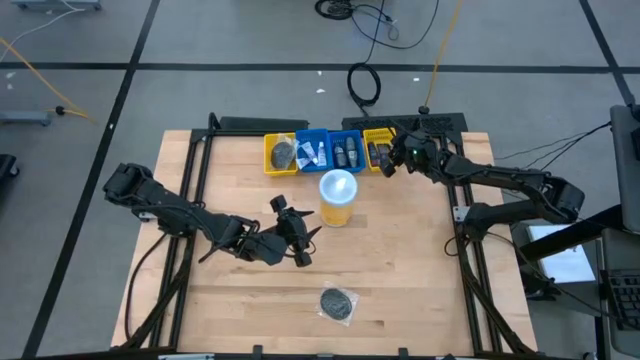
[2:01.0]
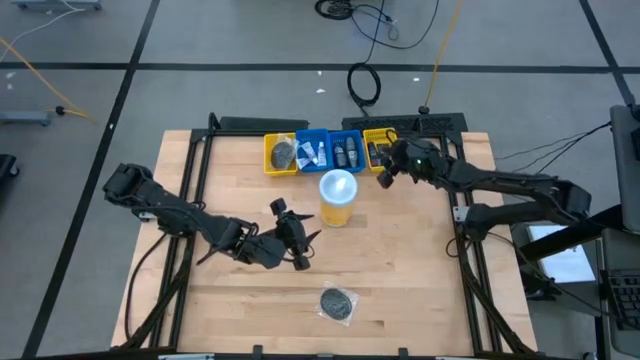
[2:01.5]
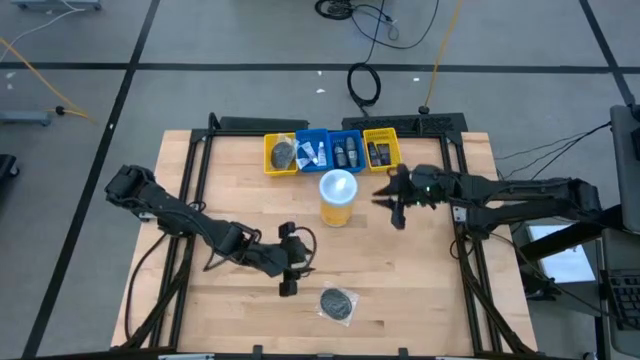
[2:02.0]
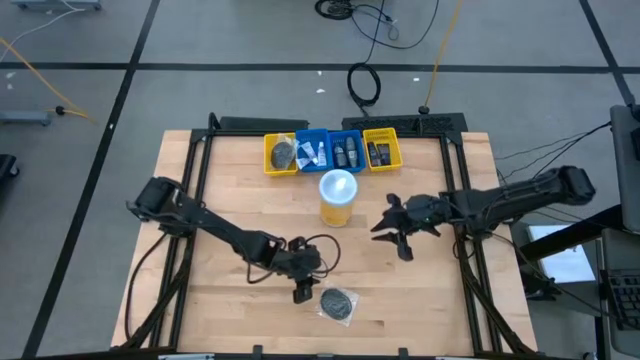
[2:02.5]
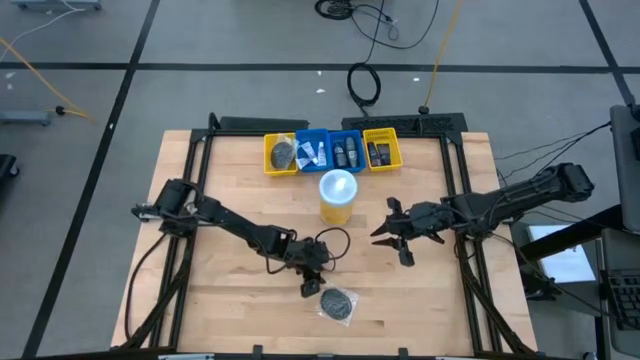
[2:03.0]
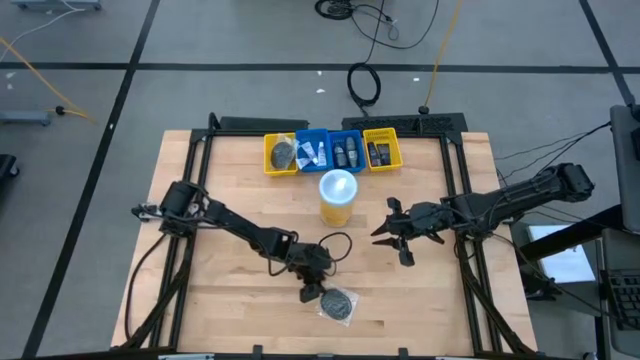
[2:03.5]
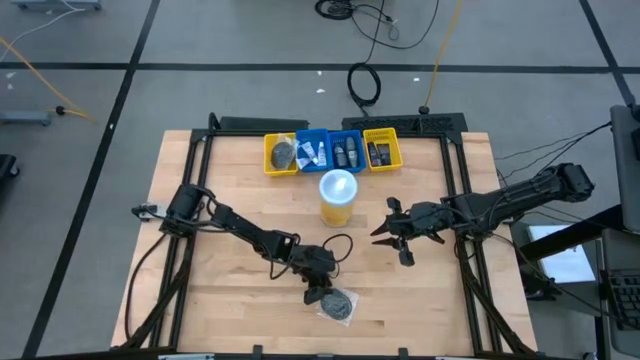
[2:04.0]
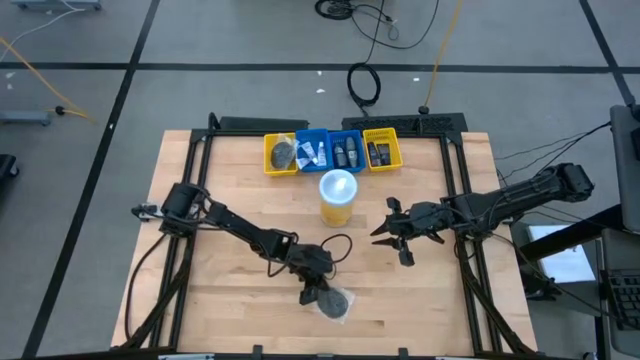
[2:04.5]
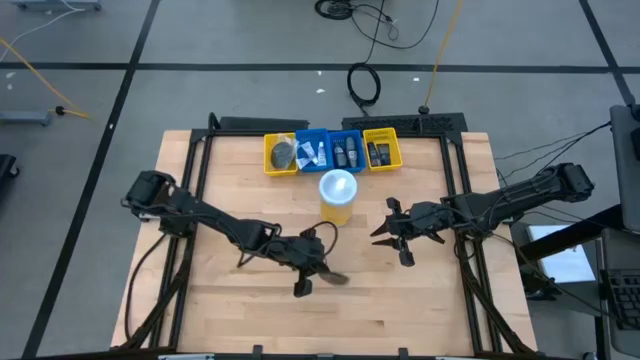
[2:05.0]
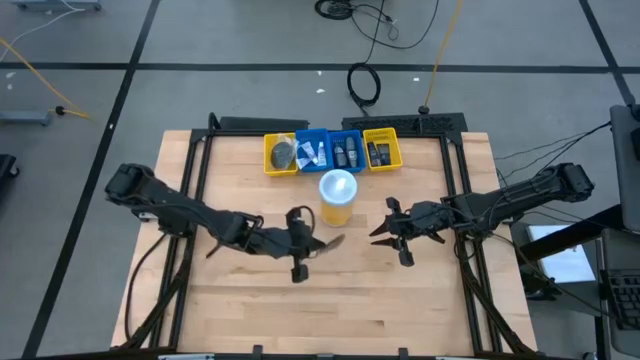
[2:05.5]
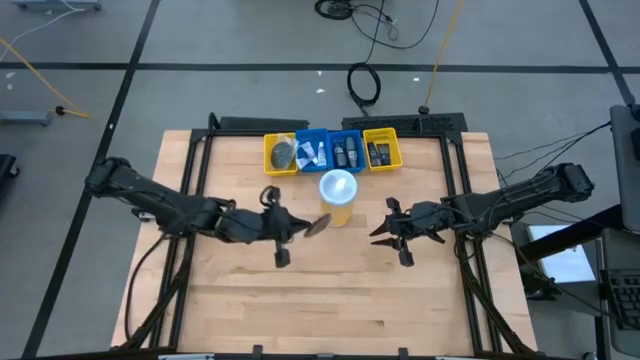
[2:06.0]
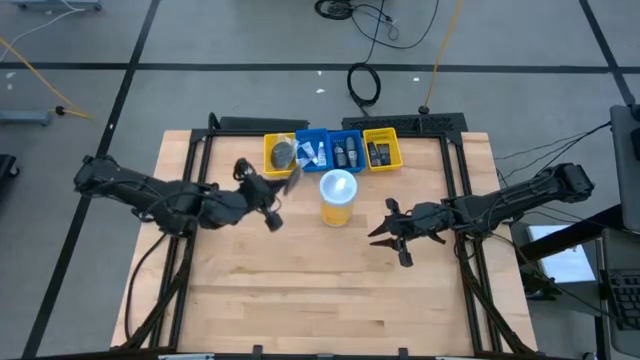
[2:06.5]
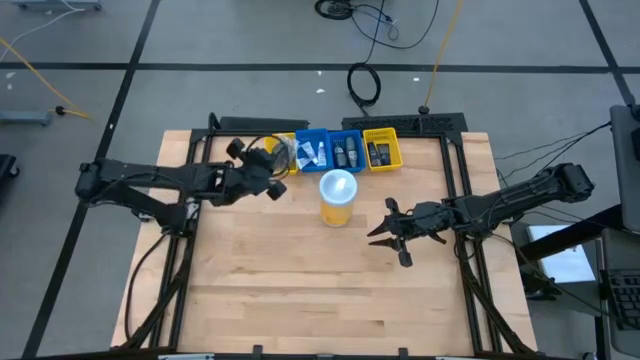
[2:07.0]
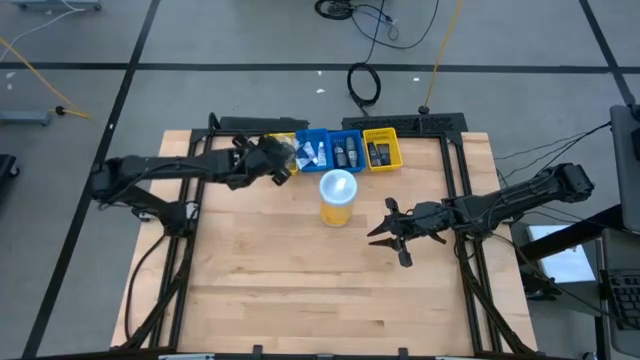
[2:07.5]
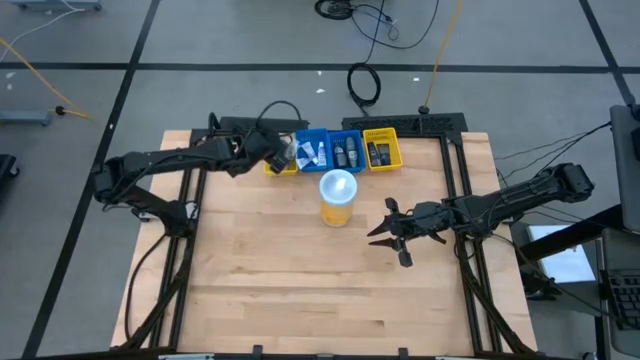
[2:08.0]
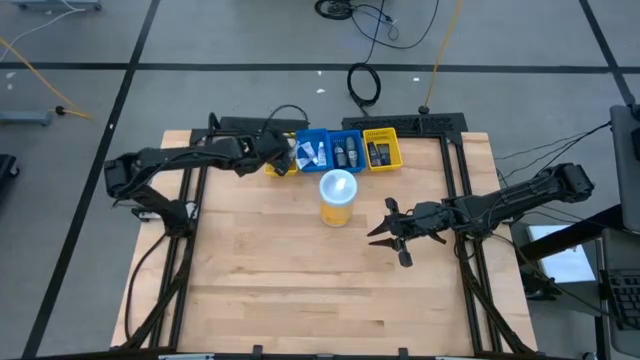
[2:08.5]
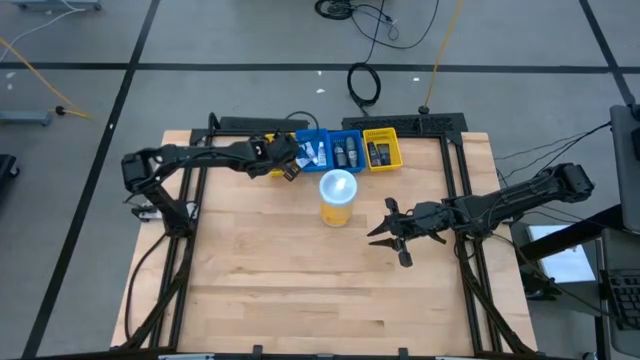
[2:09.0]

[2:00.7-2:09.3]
Task: Pick & Place Travel size toiletries
Put the hairbrush into the left yellow basket

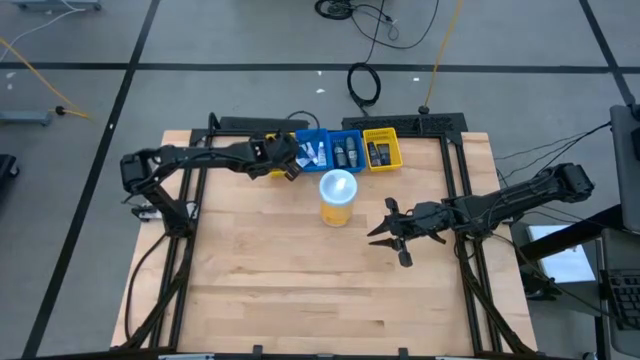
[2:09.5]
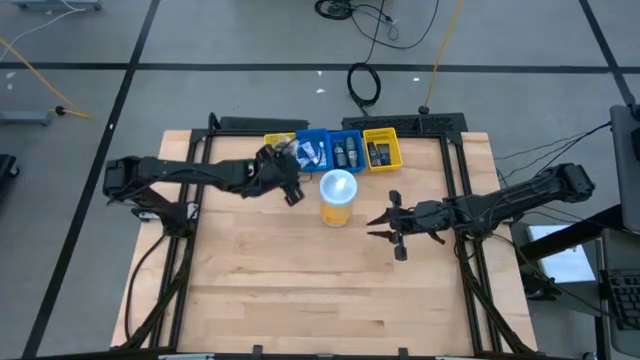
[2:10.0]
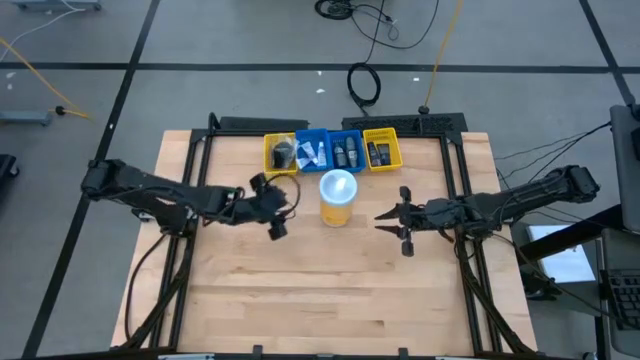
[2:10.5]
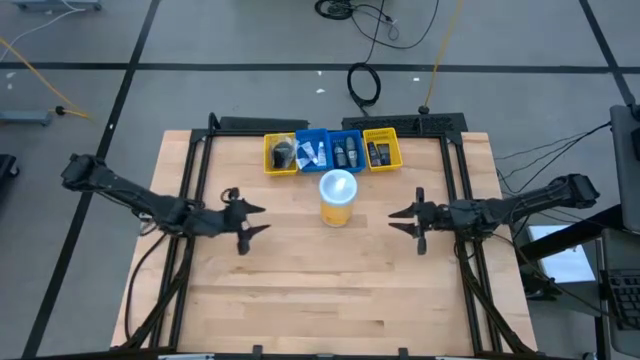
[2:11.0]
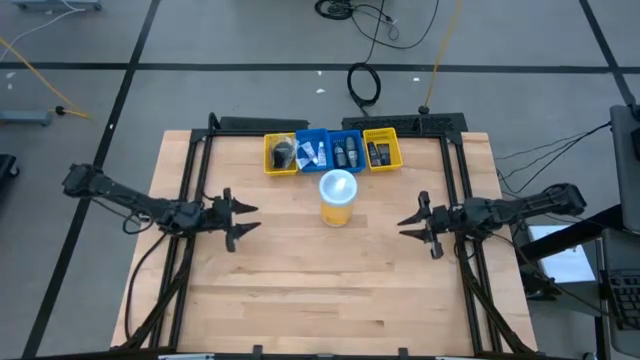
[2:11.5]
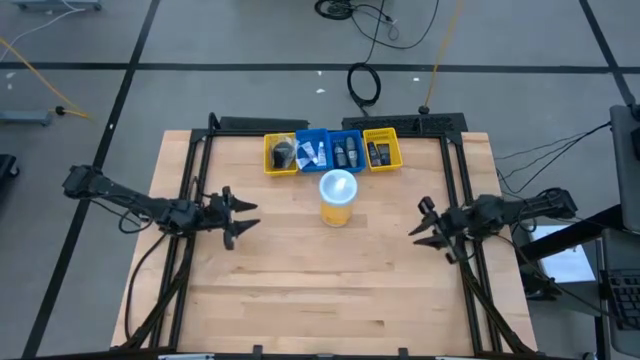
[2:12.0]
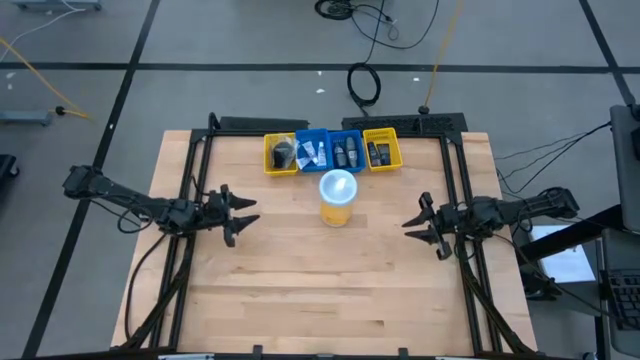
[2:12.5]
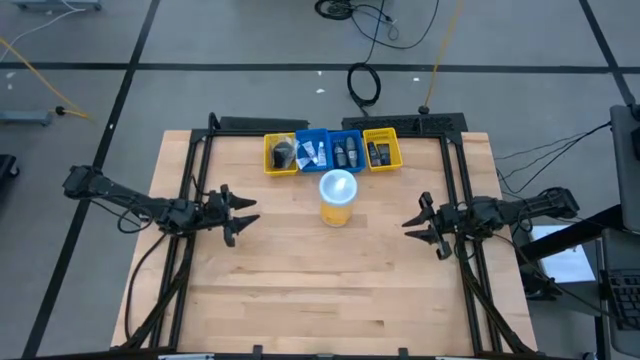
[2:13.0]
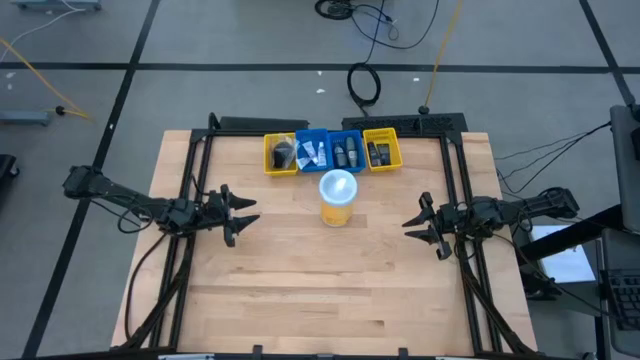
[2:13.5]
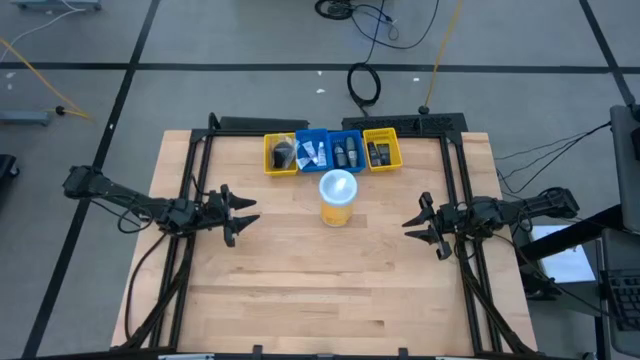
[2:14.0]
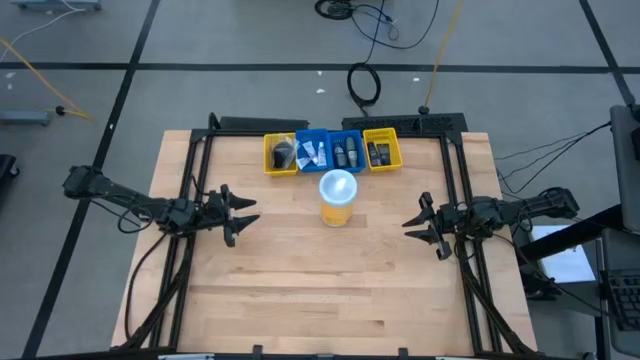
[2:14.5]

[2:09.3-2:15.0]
Return to Home Position

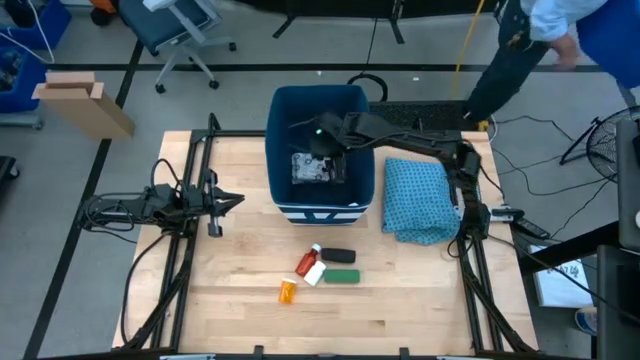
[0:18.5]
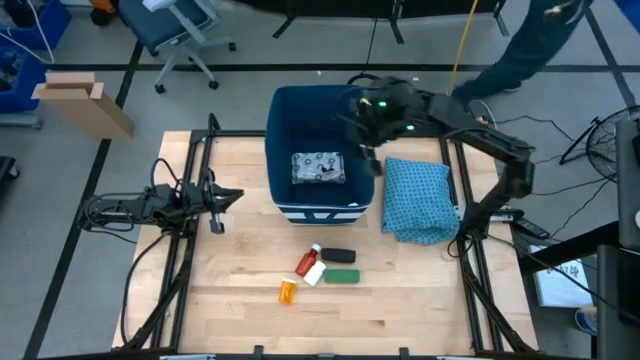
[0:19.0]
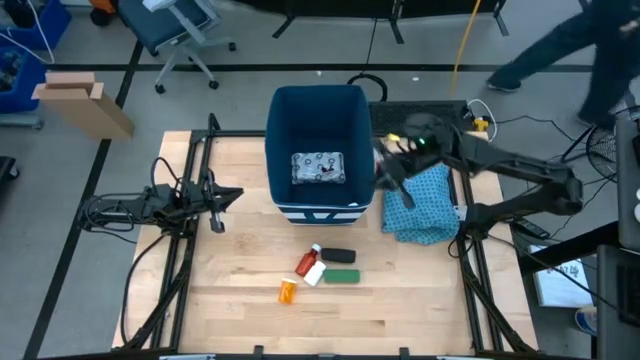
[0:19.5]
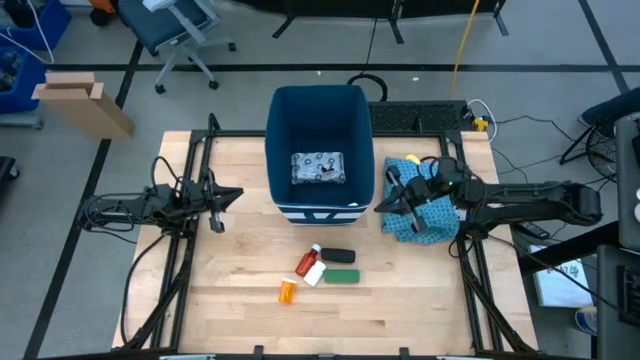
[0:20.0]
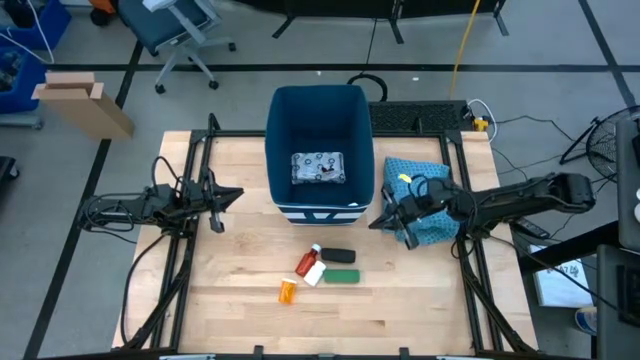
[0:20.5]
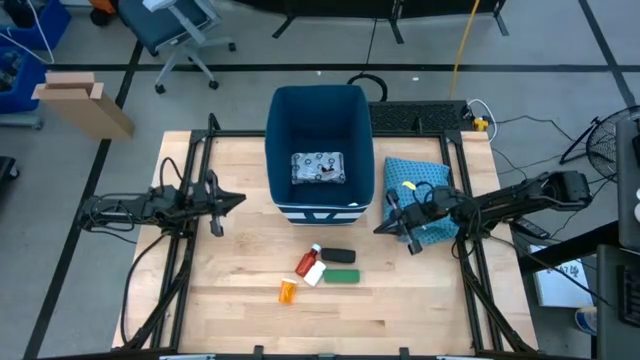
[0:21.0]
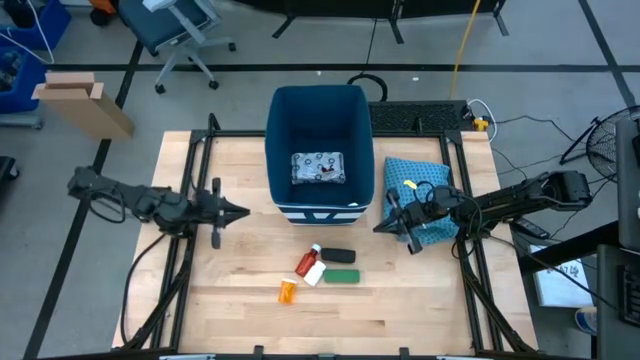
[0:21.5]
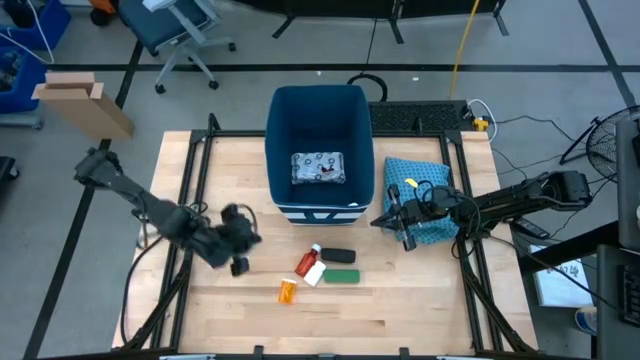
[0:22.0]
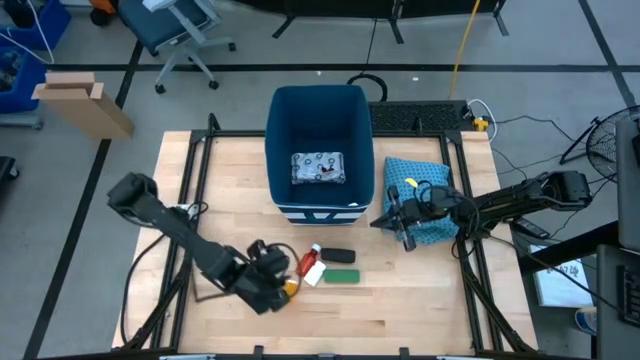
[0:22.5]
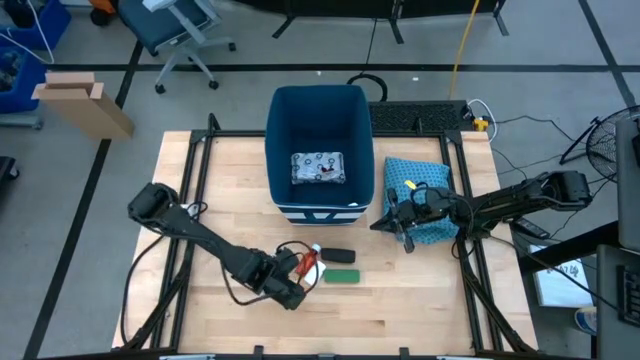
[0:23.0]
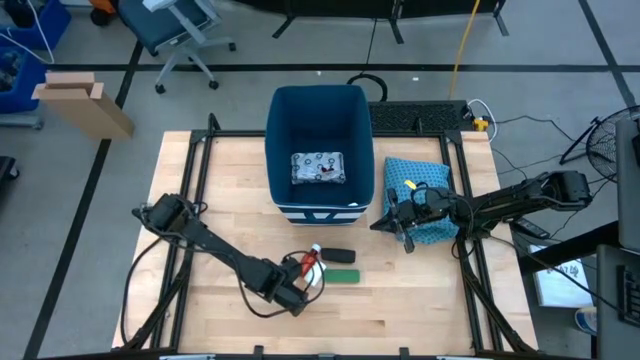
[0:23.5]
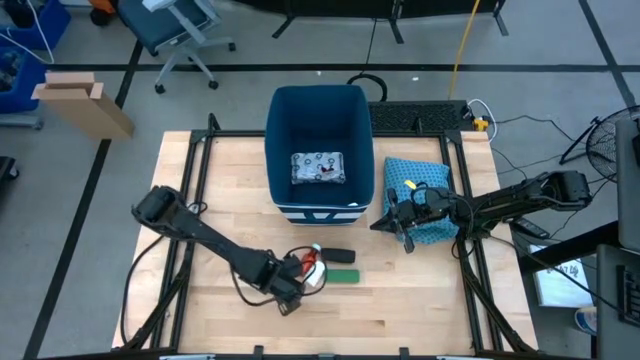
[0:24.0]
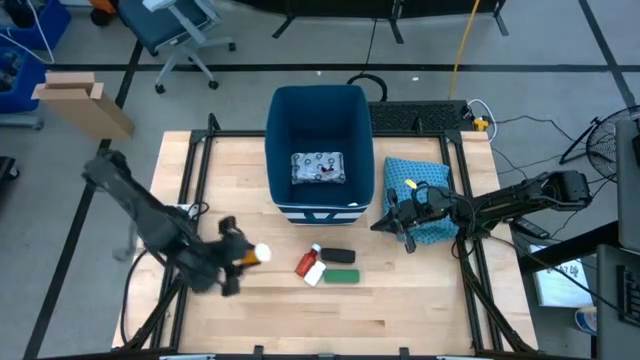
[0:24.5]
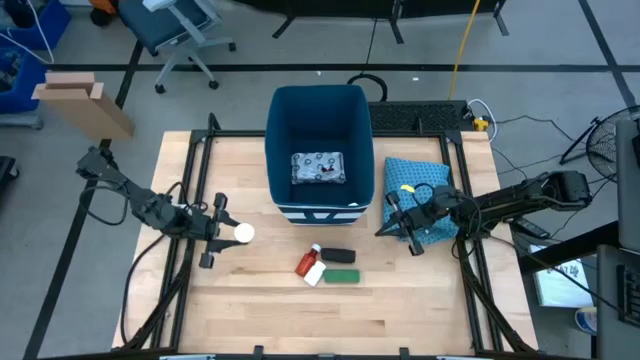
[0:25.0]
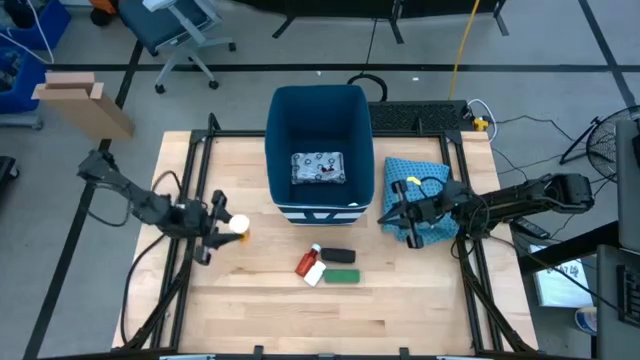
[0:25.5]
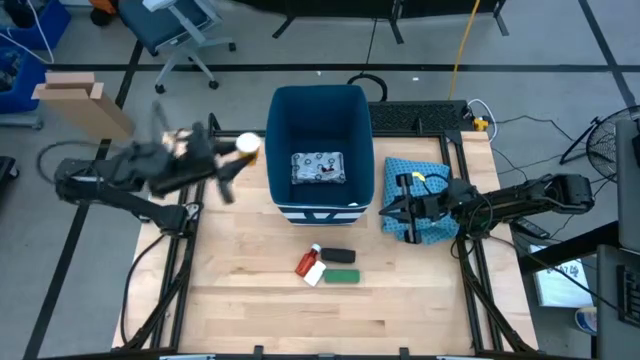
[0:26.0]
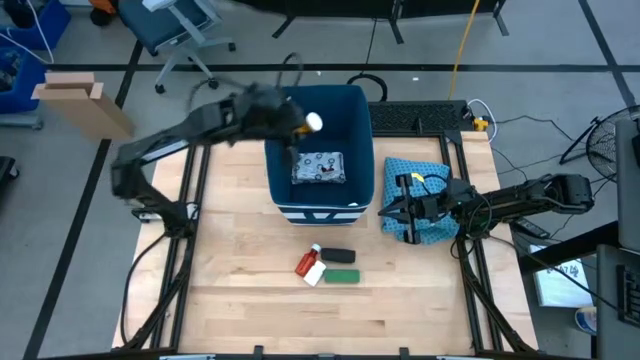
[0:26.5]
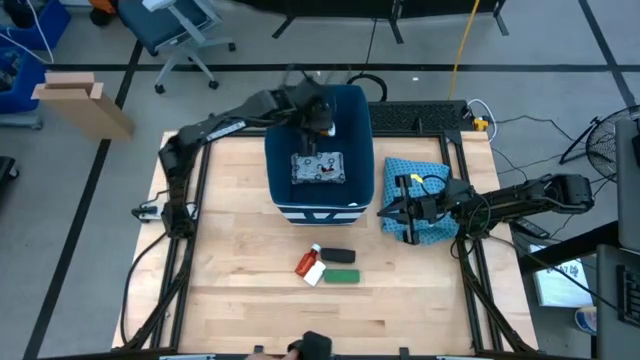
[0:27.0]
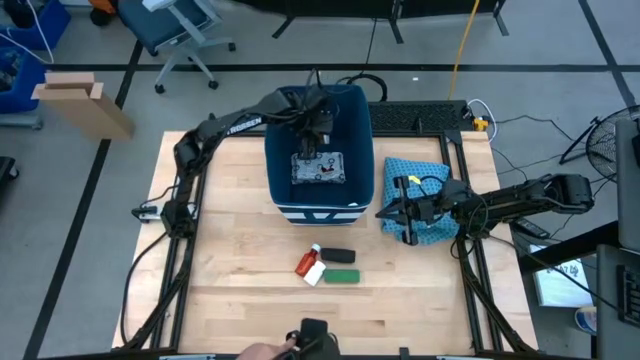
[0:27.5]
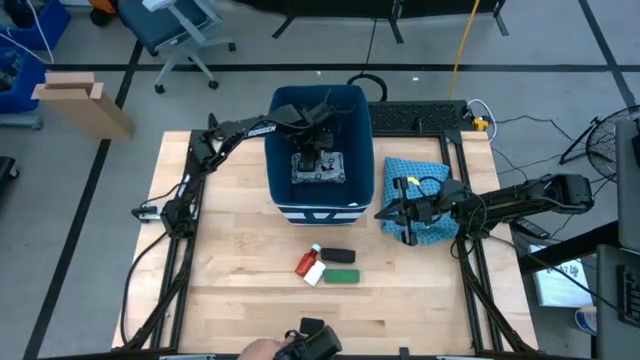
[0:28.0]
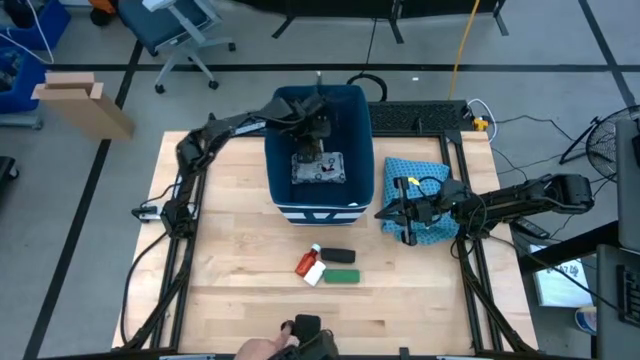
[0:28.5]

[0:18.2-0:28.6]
Task: Pick & place medical supplies in basket/bin
Put the yellow pill bottle into the blue bin
